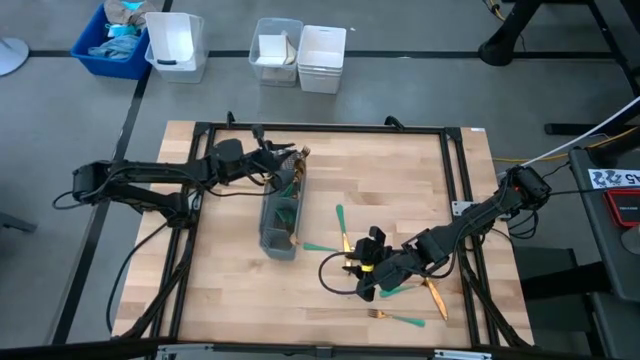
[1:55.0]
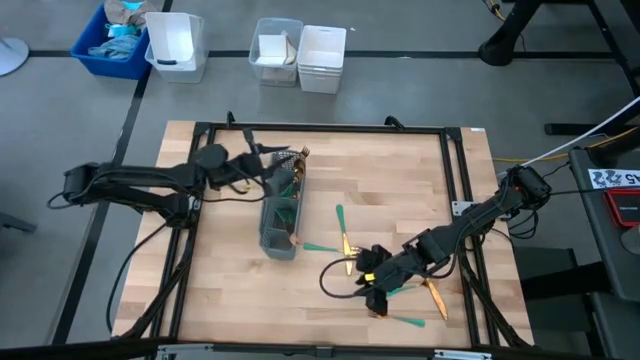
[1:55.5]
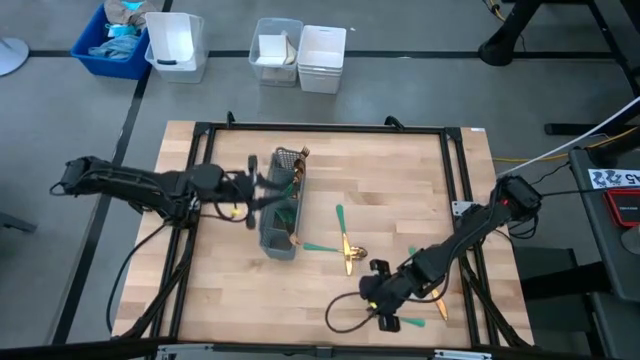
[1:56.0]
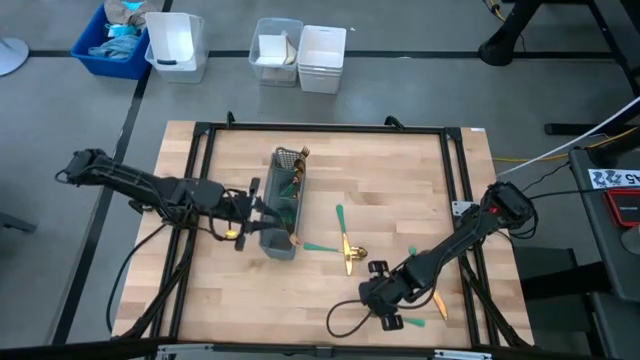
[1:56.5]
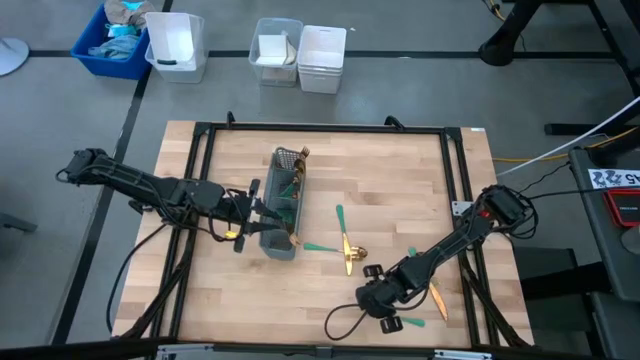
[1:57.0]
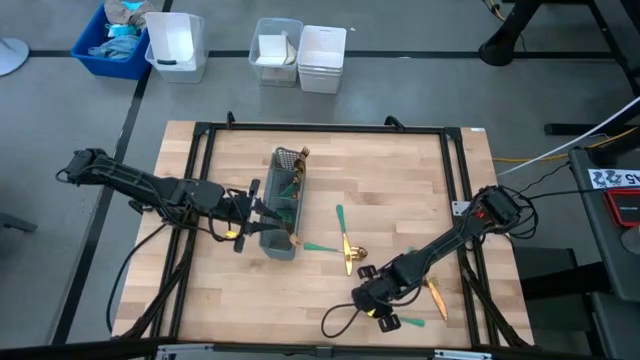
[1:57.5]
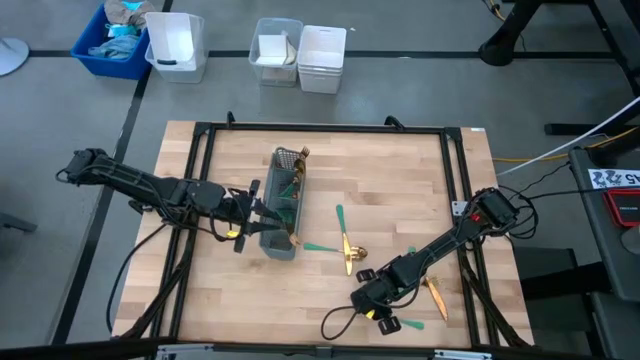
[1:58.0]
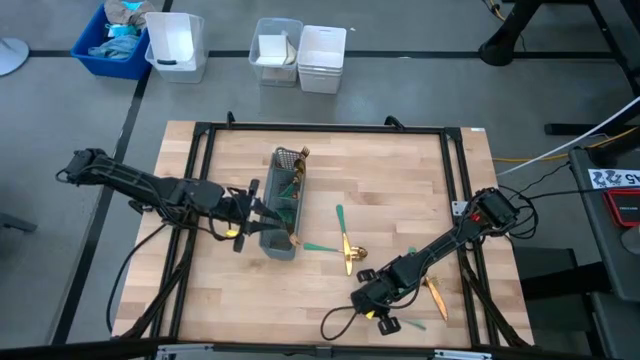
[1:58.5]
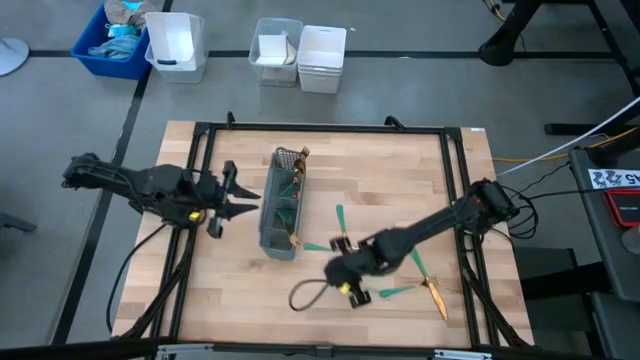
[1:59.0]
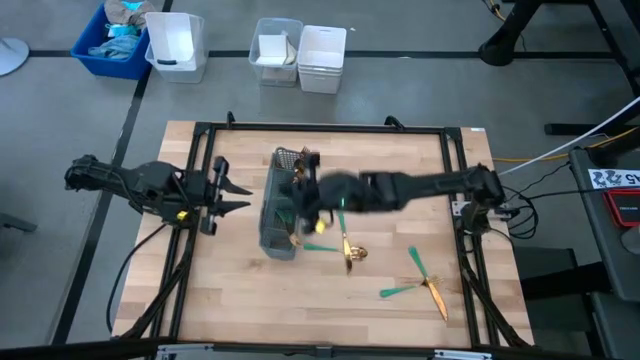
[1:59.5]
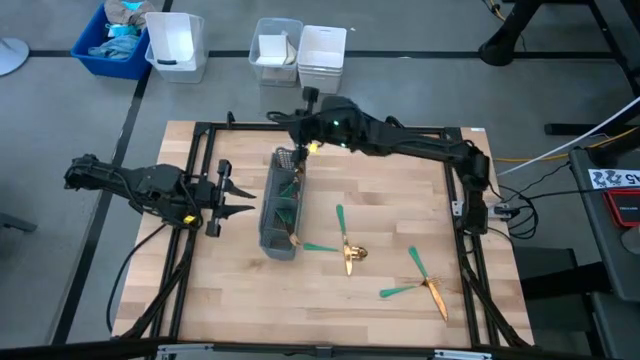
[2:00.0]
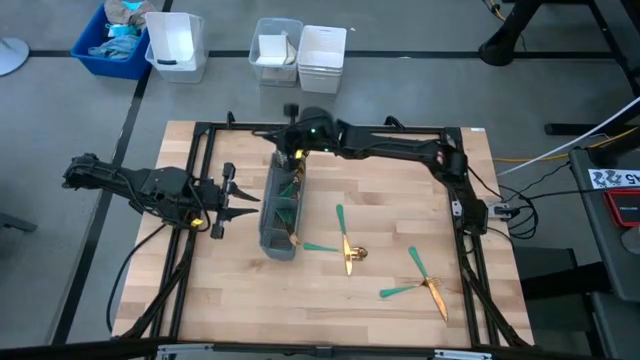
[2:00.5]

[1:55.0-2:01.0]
Task: Sort silverware
Put the green fork into the gray silverware rack

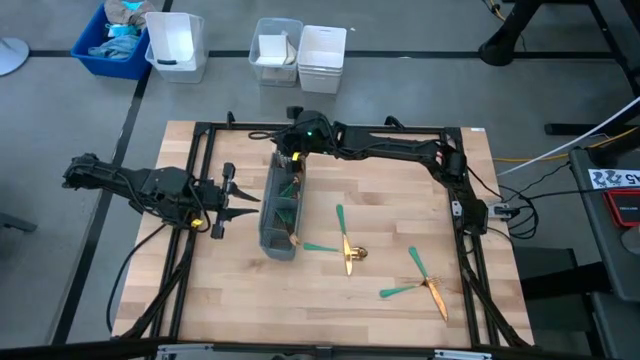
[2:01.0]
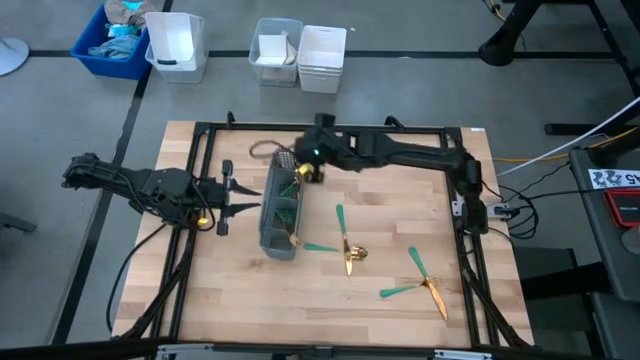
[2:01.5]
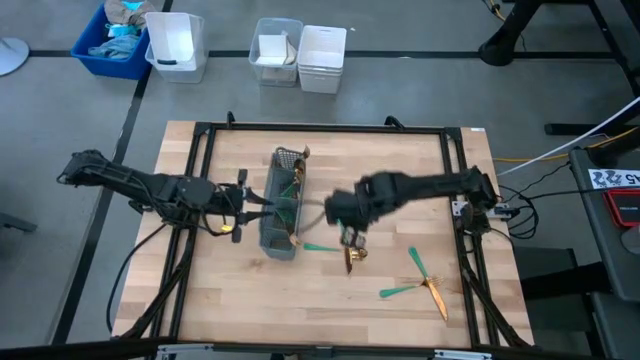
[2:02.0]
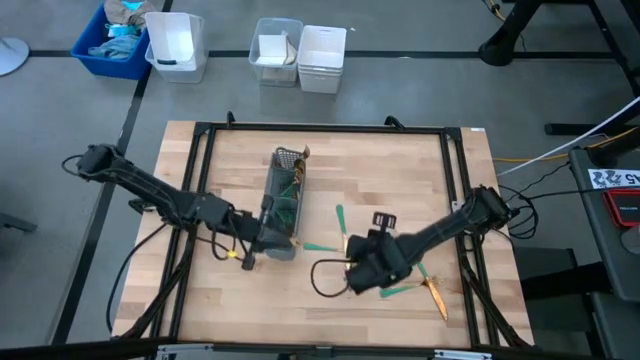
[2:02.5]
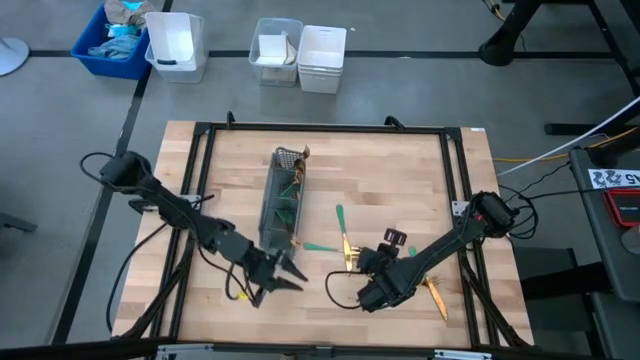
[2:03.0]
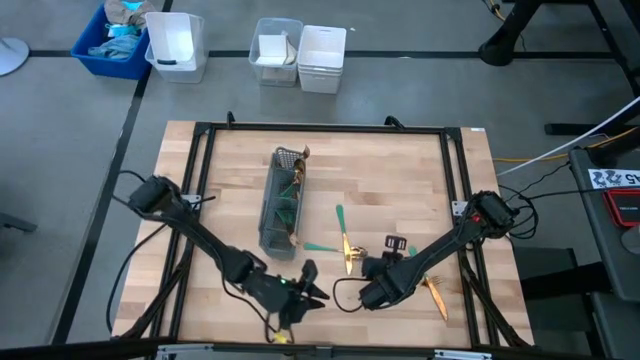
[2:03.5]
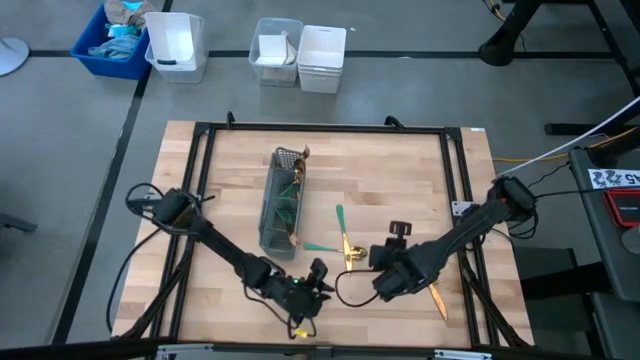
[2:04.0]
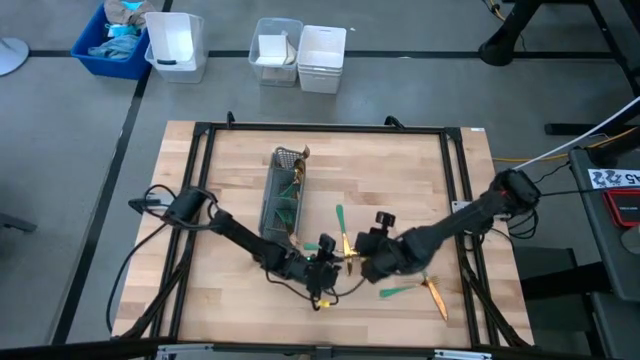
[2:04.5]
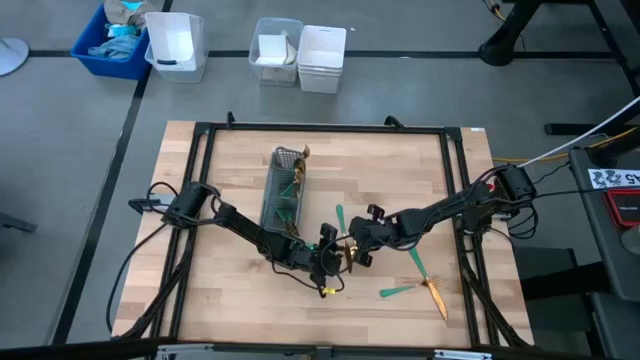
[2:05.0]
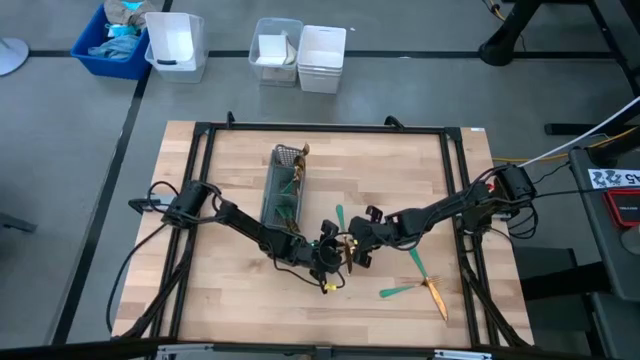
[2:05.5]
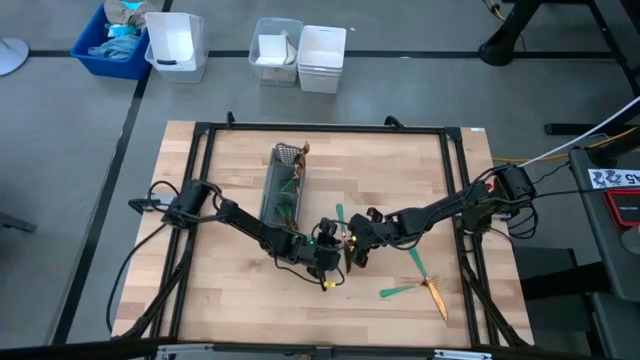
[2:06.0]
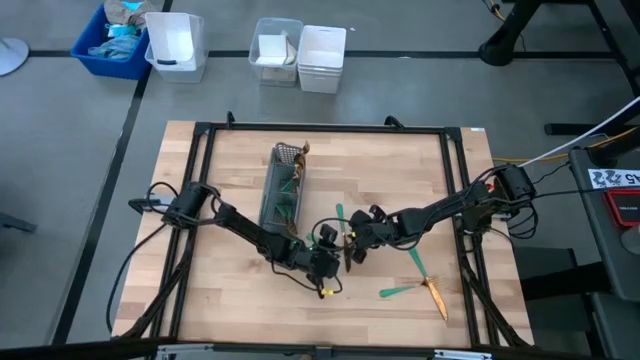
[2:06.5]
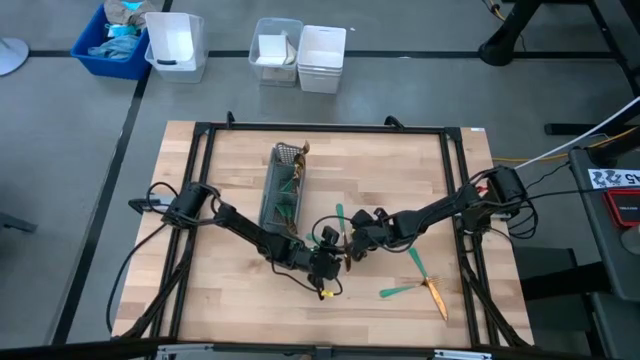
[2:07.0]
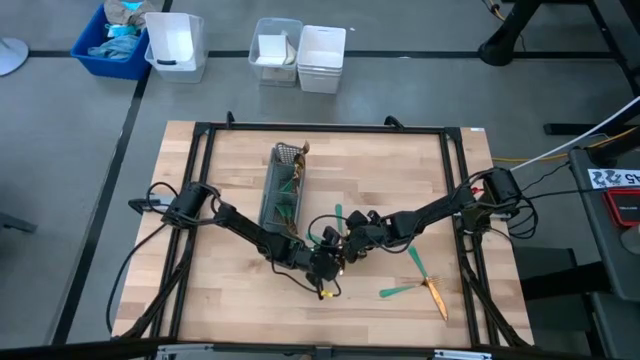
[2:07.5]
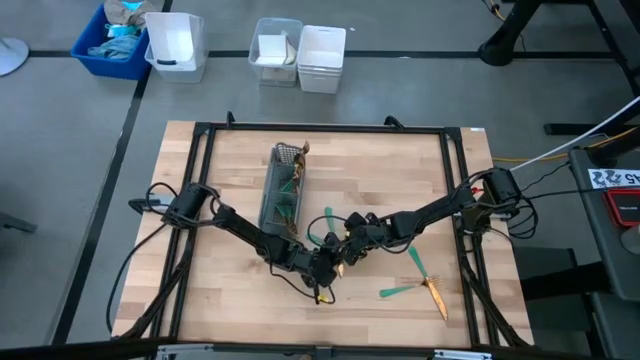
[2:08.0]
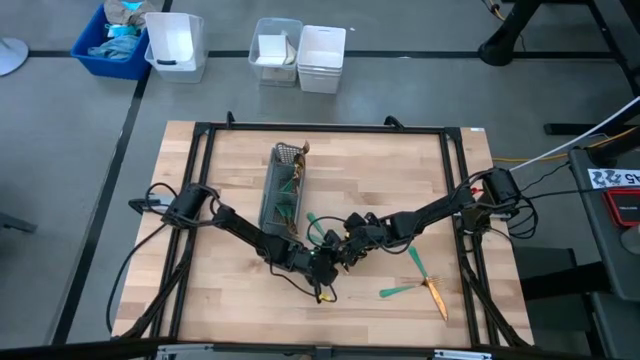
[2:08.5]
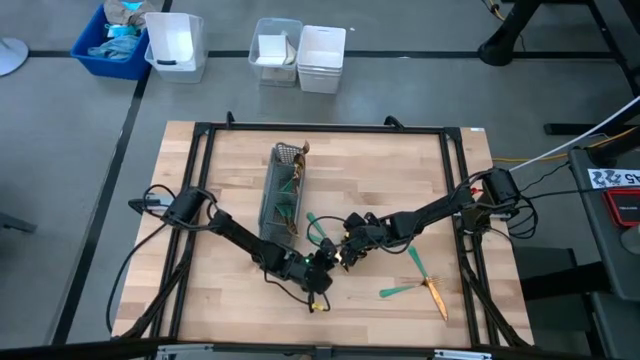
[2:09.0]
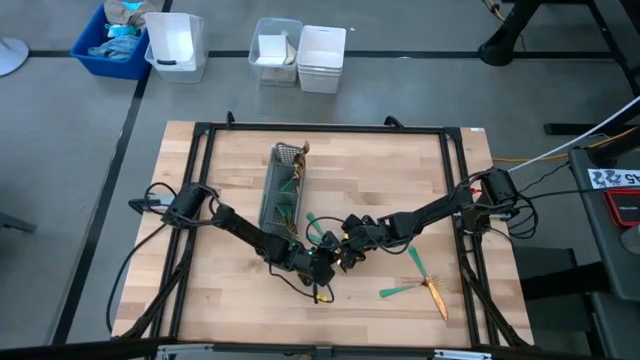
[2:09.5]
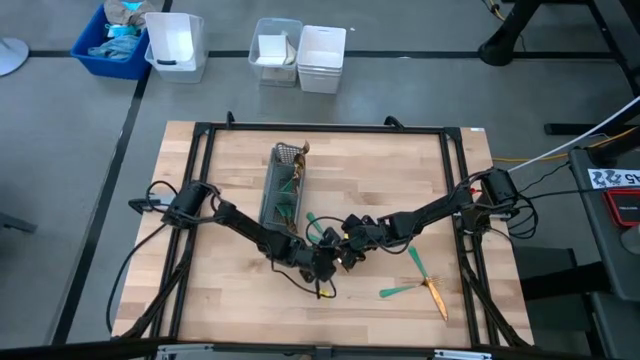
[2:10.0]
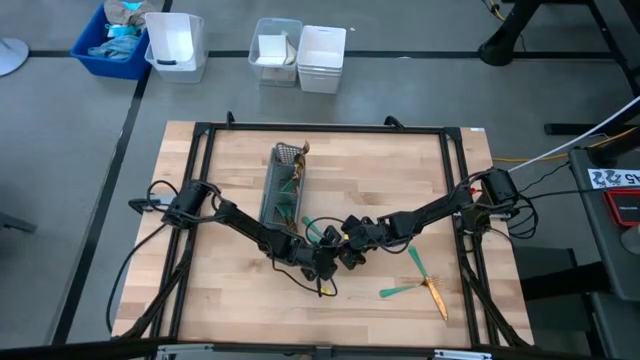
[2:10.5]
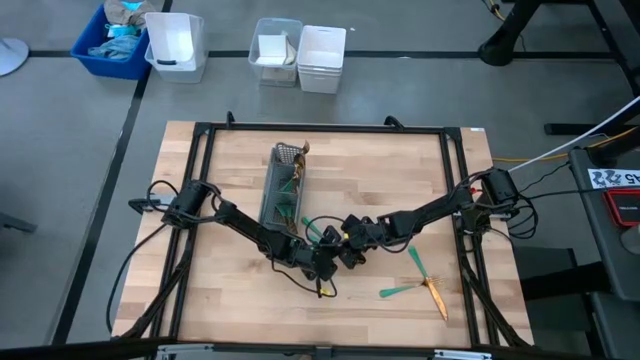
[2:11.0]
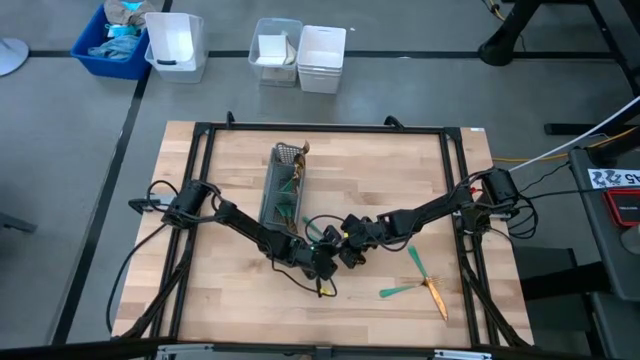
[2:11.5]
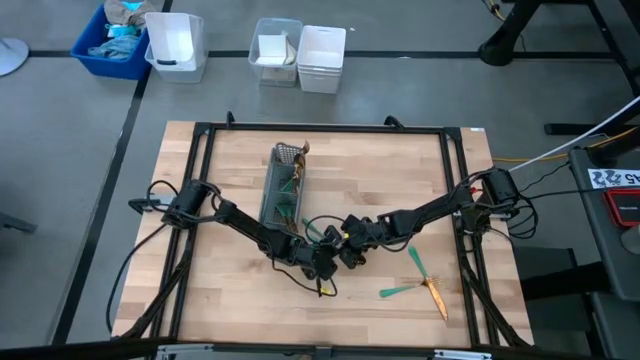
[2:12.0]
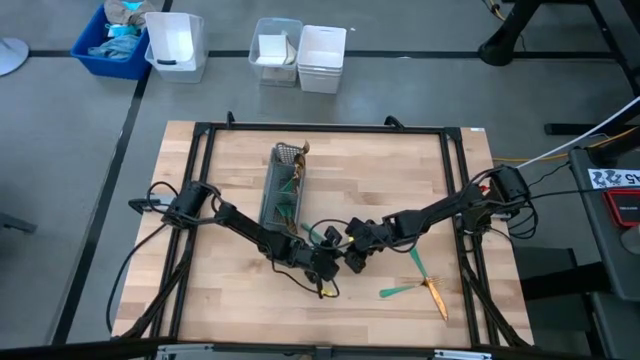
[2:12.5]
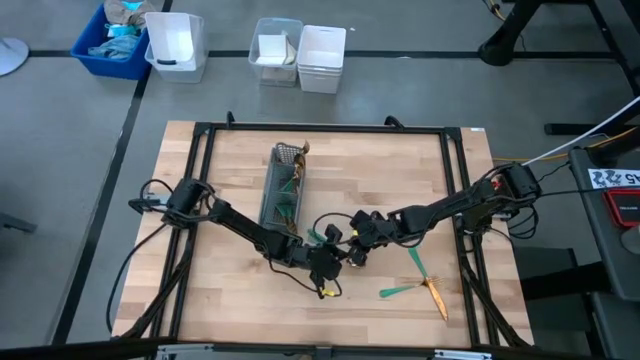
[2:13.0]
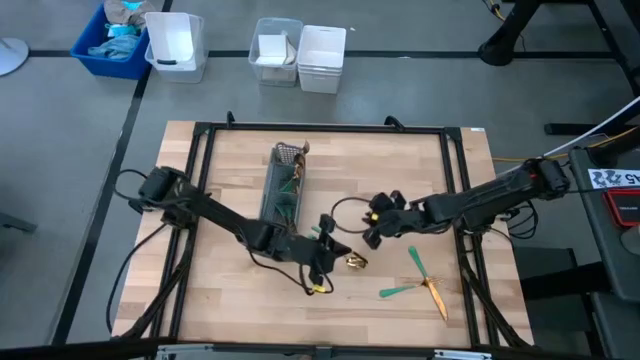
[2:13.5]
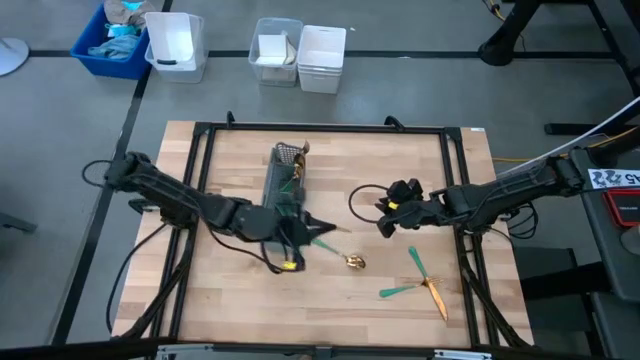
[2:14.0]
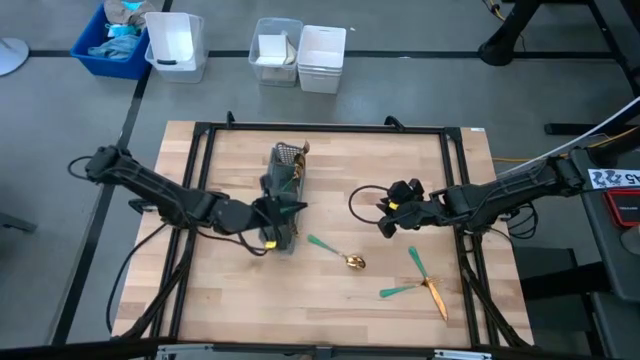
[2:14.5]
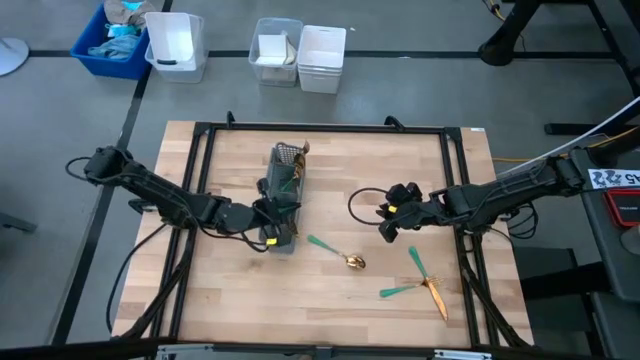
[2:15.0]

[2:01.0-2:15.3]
Put the green table knife into the gray silverware rack
